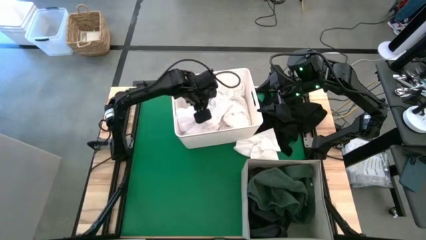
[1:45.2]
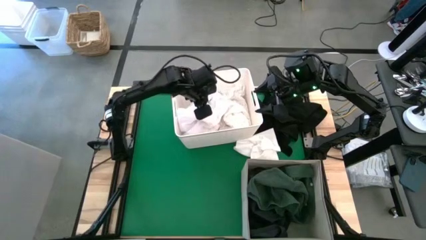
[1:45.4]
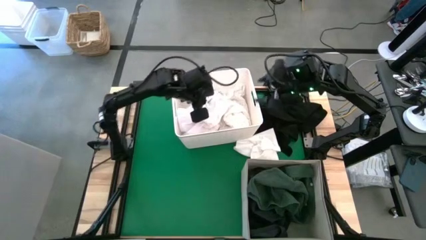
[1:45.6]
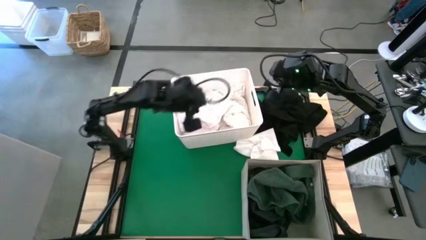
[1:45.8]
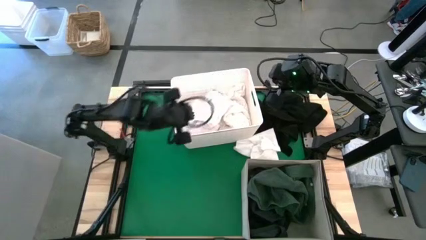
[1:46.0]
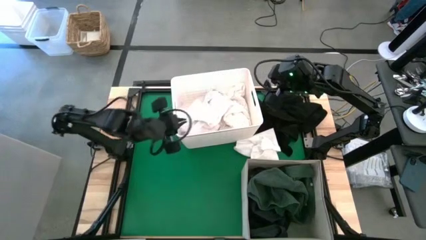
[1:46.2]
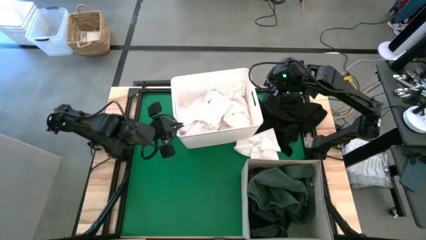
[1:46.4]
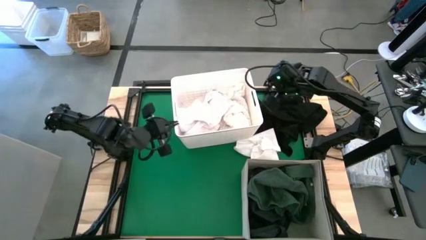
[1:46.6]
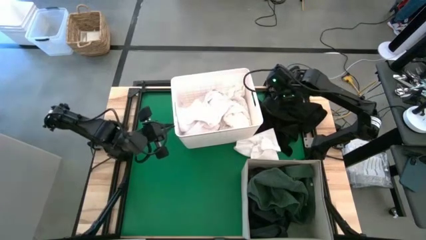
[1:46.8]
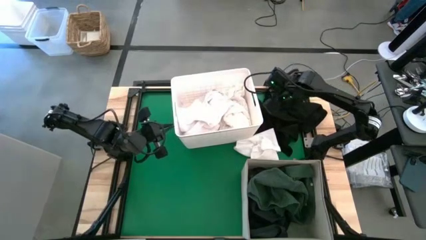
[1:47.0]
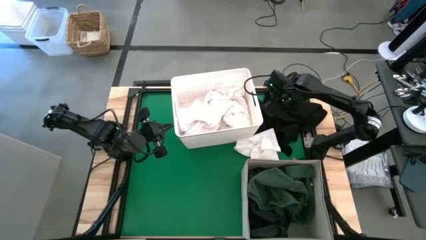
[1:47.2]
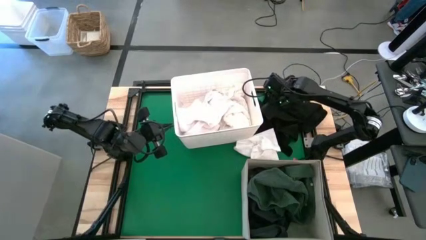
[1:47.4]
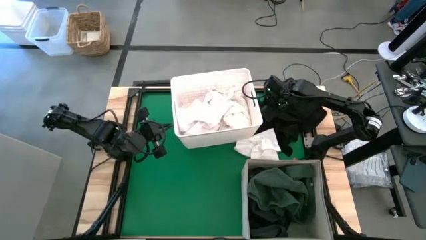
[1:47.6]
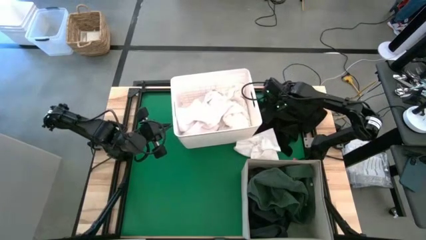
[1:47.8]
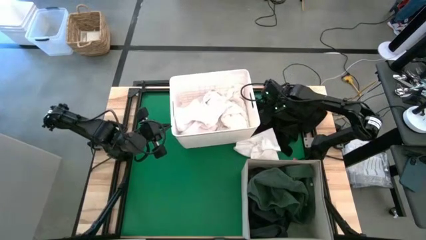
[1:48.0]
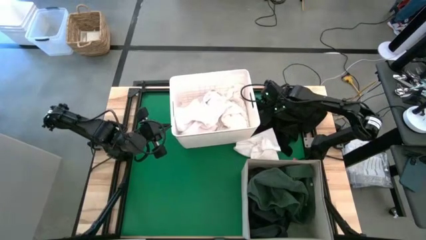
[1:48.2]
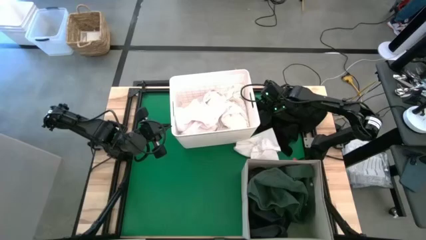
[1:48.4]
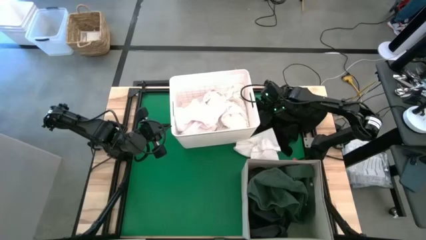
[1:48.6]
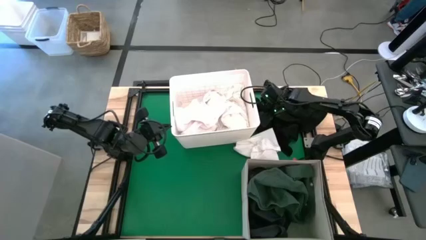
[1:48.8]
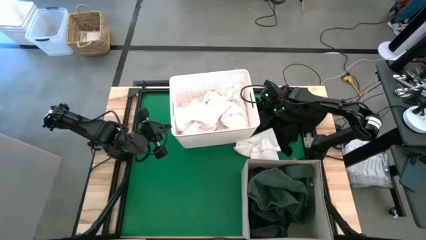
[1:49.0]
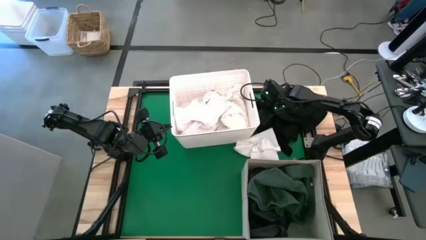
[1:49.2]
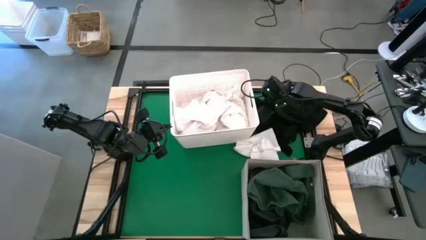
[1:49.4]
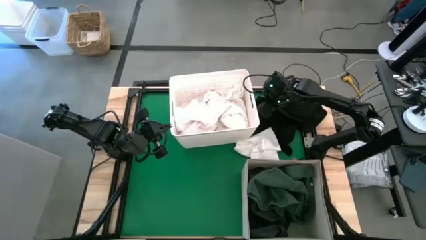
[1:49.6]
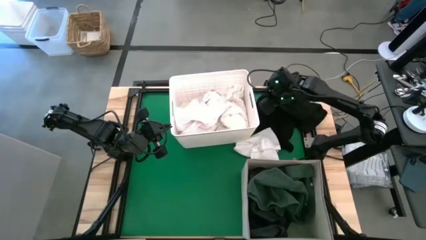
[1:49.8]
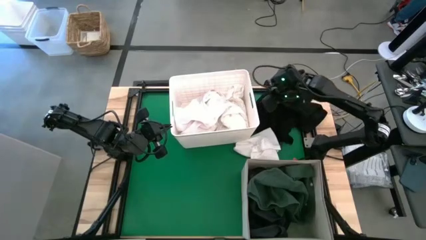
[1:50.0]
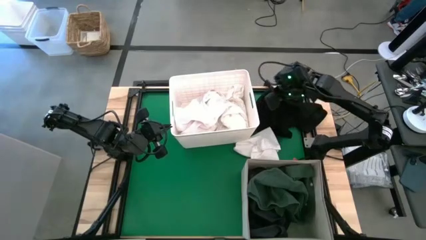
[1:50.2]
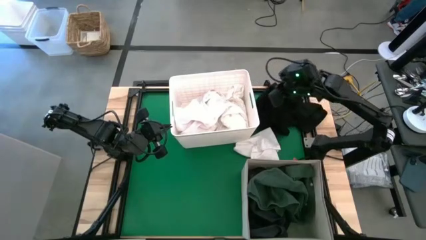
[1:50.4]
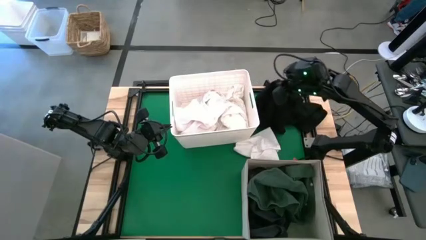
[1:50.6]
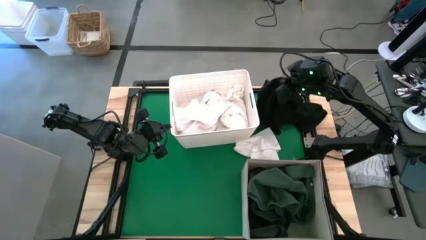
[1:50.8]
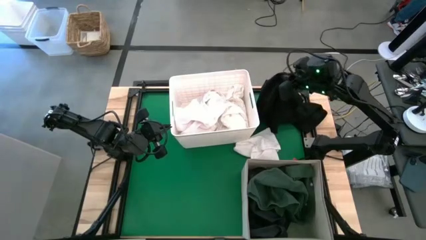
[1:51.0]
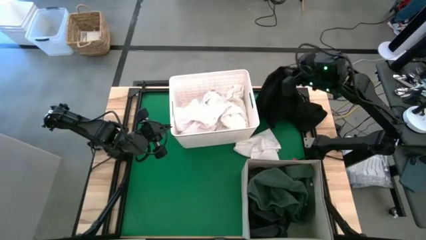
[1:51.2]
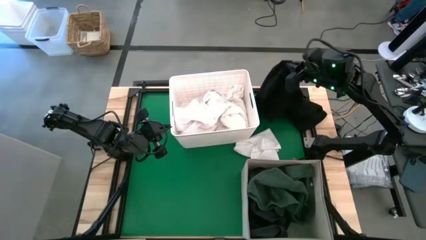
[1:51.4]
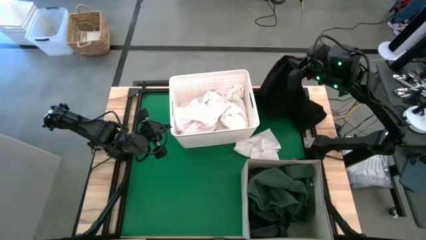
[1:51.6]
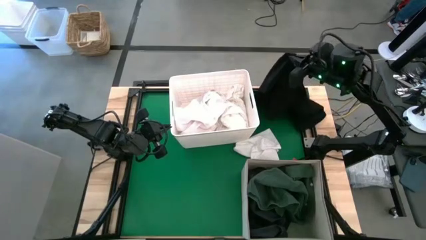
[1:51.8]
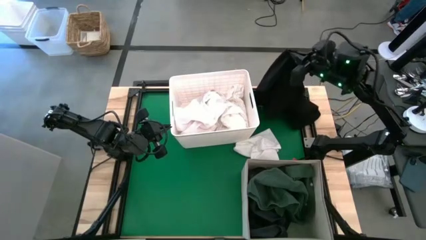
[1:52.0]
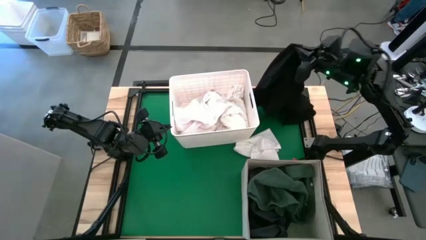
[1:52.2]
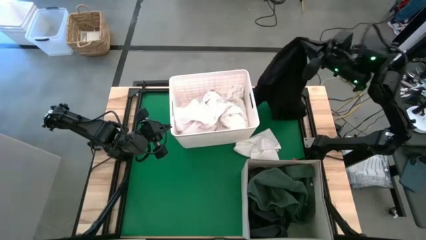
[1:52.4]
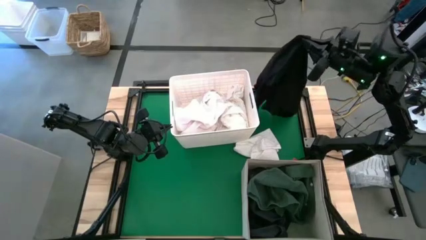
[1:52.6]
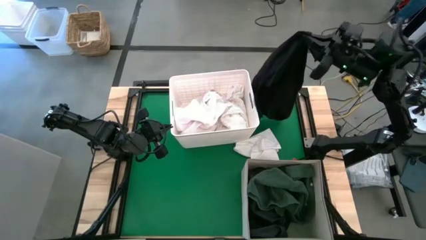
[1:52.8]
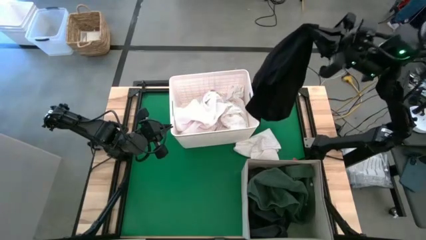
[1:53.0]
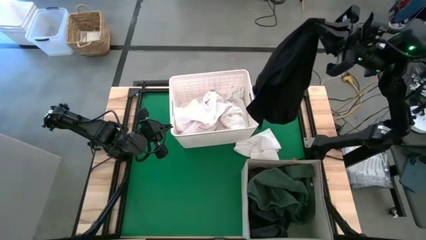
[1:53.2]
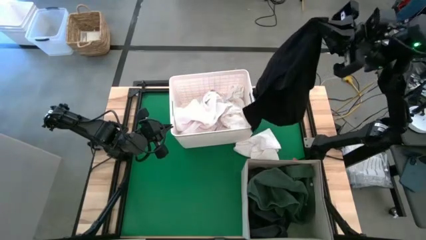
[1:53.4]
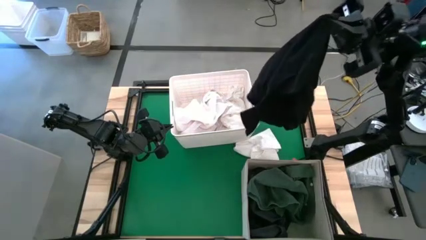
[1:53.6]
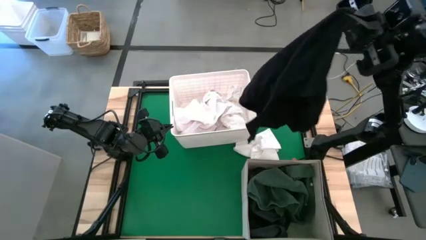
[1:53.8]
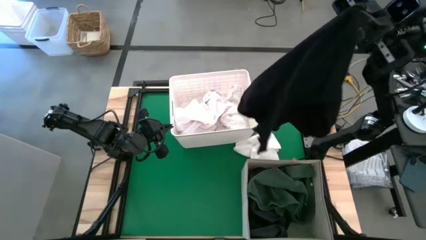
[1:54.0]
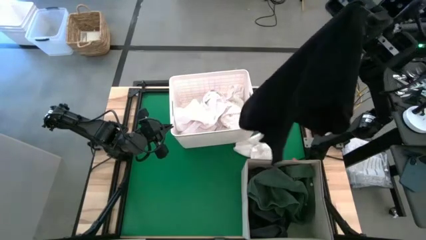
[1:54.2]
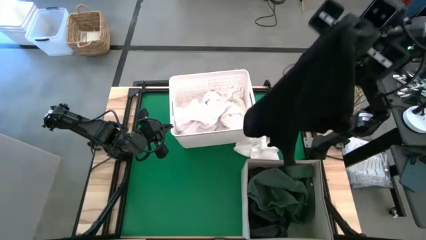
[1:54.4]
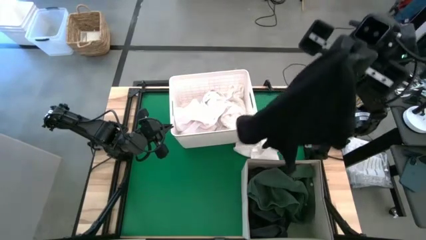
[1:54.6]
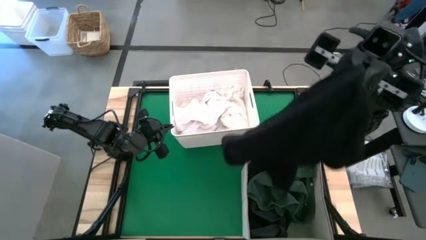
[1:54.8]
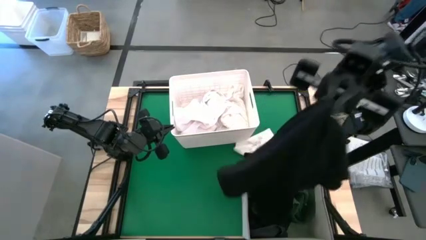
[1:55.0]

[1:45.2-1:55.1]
Put the black cloth into the white fabric storage bin
